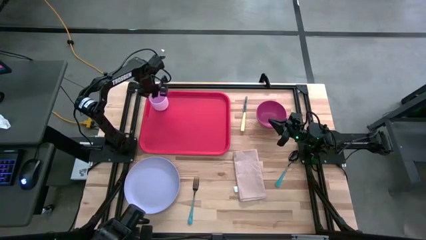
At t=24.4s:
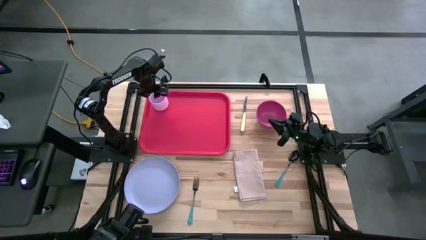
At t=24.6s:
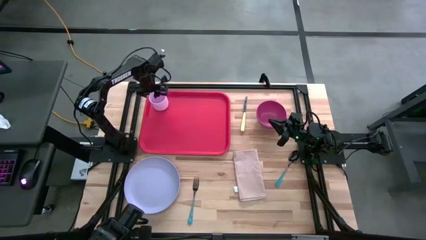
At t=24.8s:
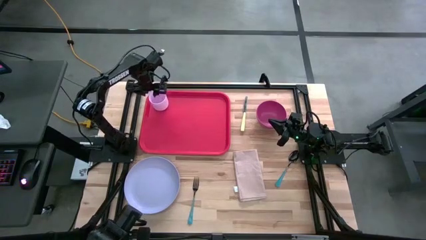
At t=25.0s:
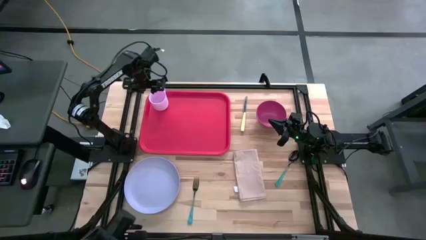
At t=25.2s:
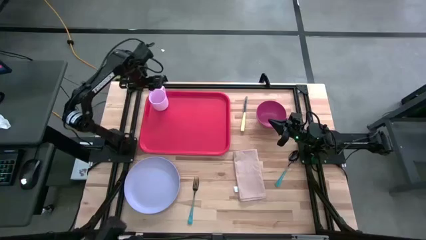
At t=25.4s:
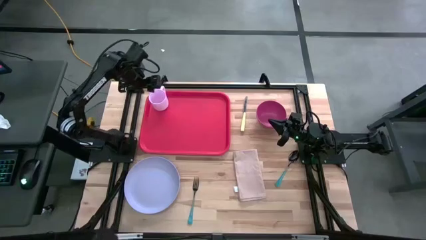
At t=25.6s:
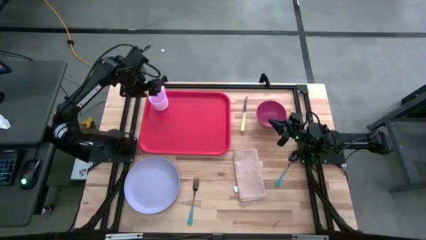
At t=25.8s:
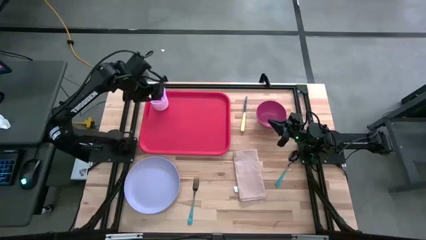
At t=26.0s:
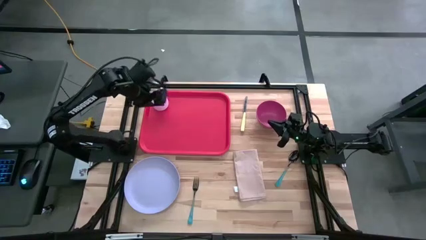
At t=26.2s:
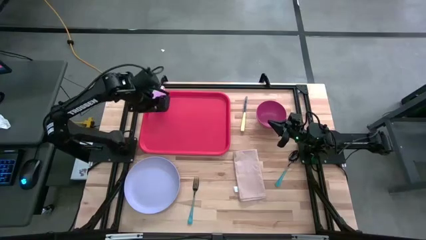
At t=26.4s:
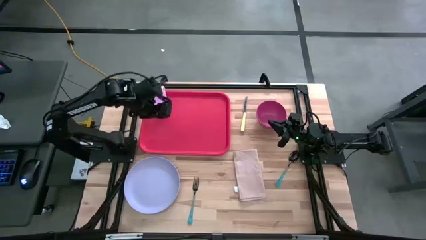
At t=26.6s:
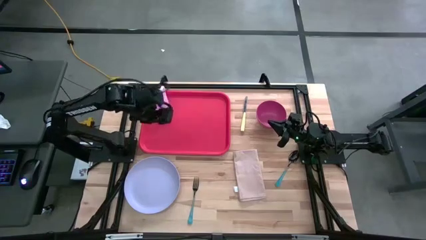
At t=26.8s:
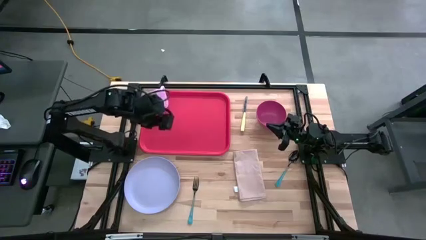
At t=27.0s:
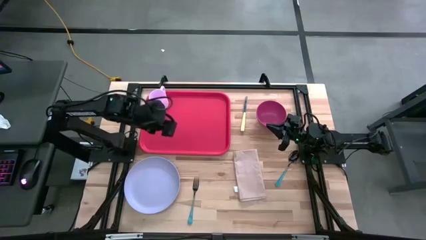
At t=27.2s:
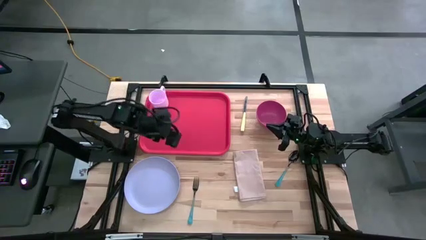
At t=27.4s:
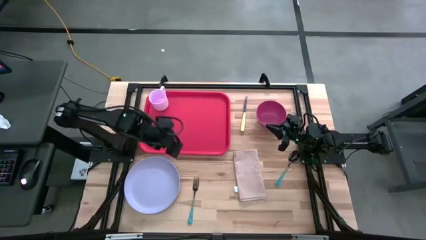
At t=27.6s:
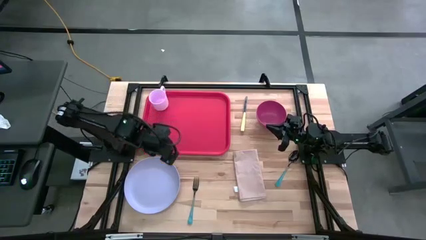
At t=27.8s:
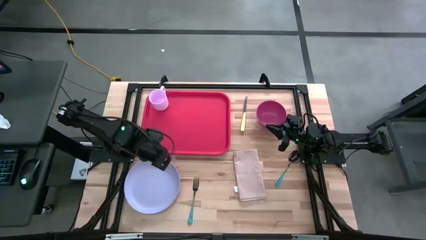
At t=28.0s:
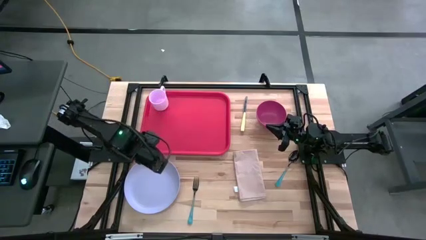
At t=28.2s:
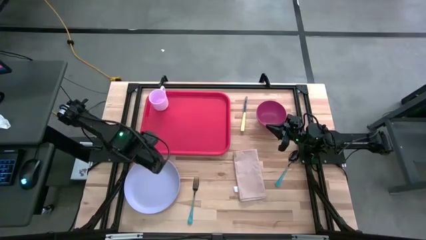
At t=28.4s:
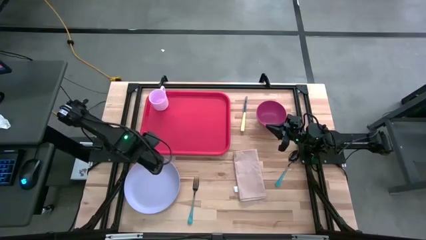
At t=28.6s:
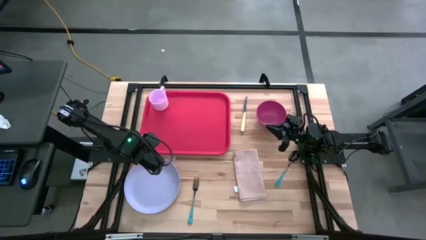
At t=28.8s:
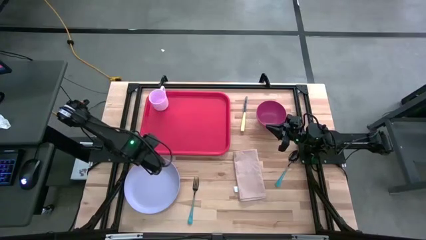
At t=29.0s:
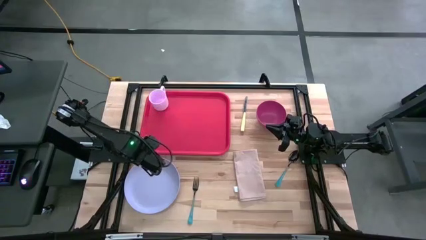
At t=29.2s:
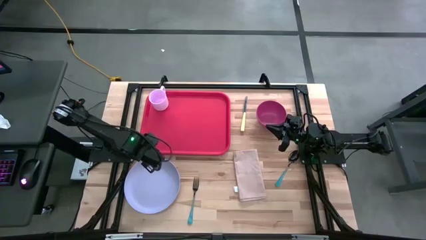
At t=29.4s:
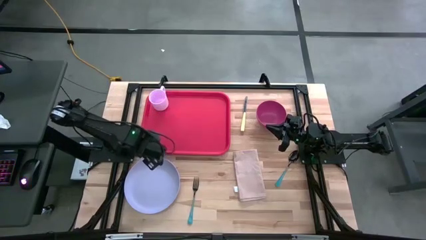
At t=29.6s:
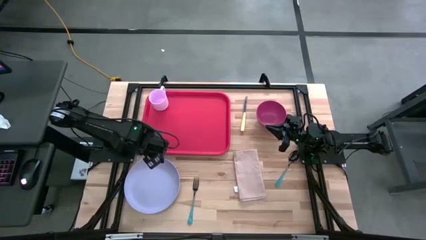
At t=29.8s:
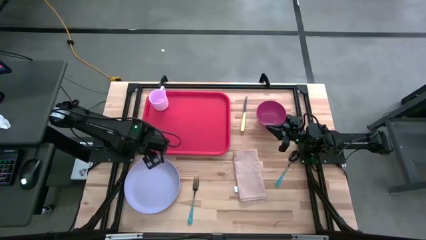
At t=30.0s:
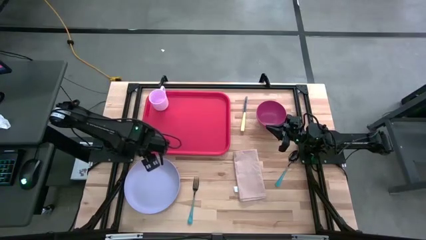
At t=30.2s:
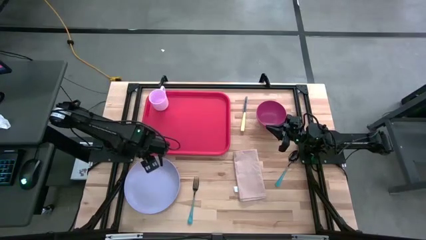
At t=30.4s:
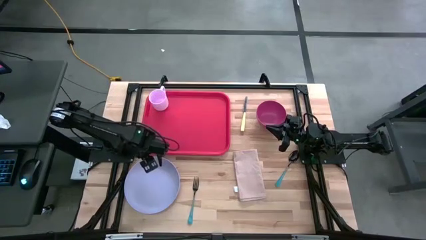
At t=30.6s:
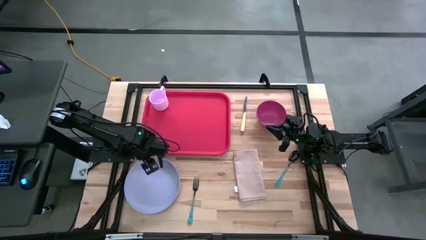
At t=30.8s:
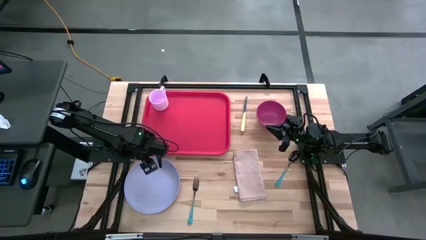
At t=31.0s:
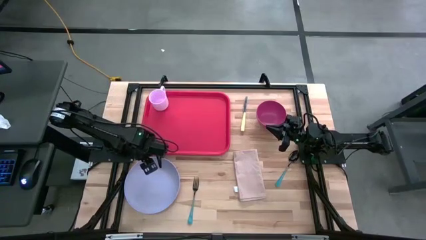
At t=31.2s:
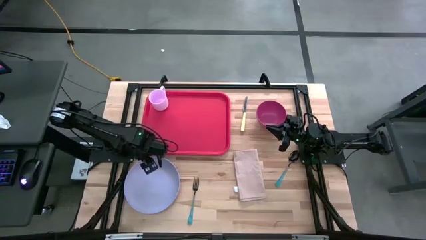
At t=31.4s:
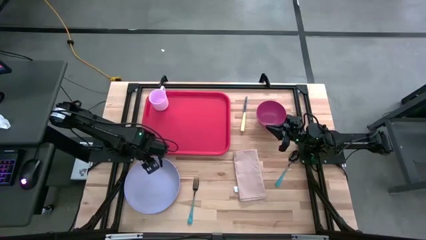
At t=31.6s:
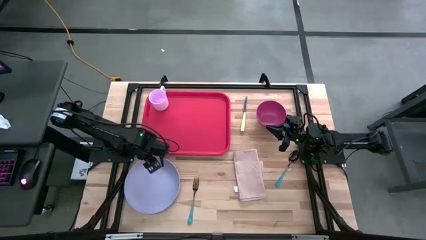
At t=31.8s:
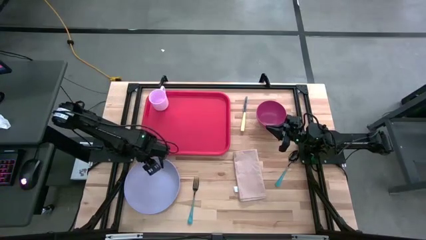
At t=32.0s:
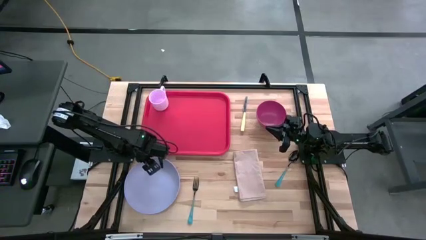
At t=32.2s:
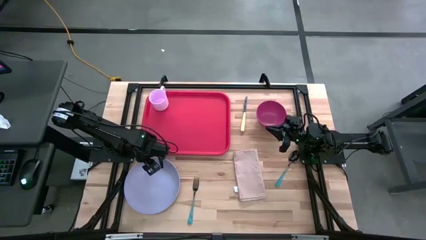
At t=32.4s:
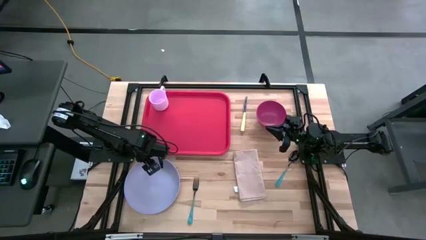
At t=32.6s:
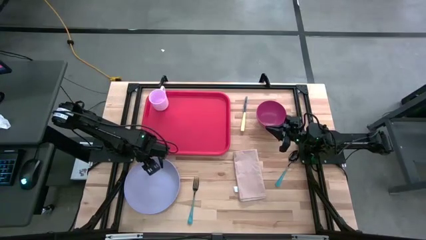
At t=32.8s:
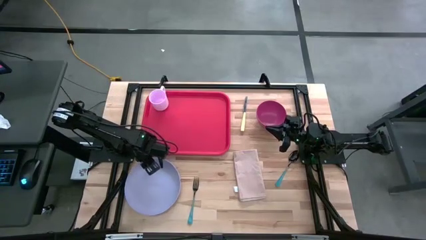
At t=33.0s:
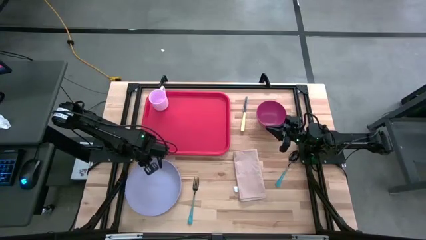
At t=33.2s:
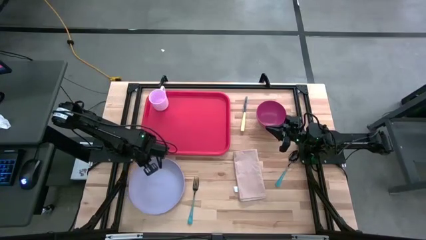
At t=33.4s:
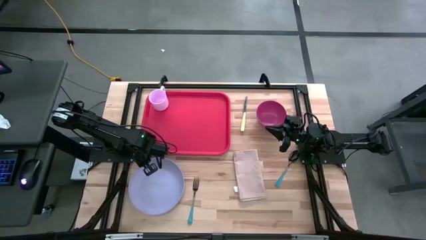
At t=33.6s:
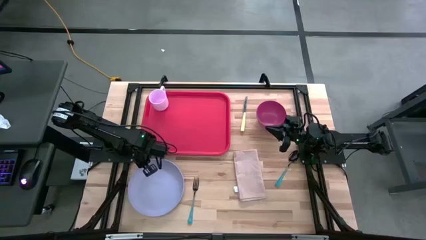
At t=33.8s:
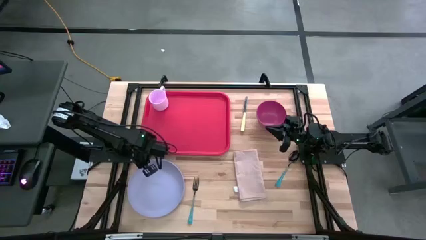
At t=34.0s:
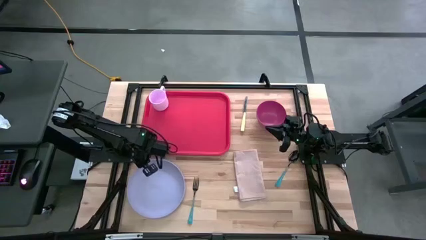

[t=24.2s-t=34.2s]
Task: Set up tray
Put the purple plate on the red tray to the bottom right of the pink mug

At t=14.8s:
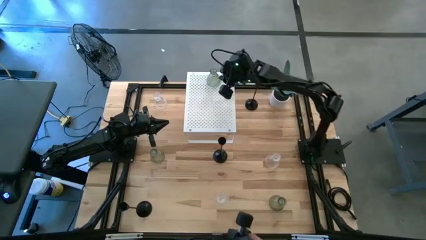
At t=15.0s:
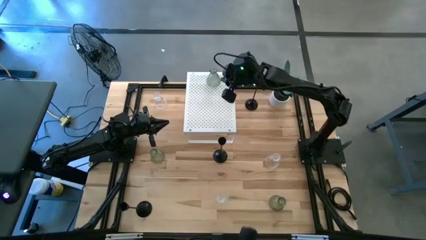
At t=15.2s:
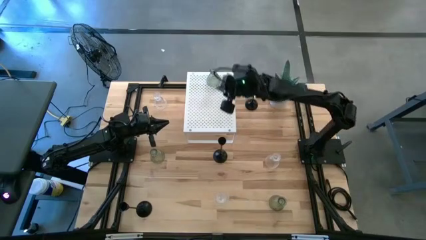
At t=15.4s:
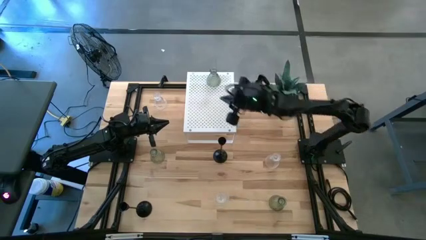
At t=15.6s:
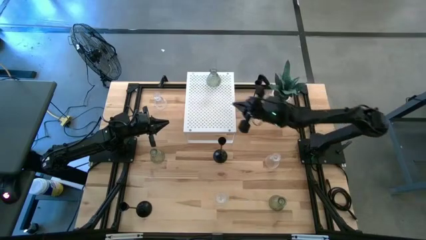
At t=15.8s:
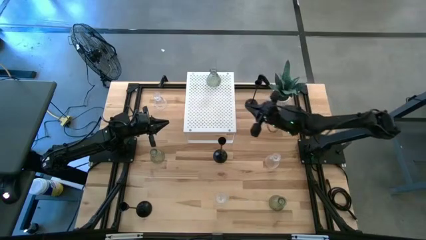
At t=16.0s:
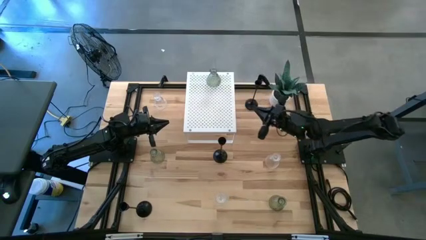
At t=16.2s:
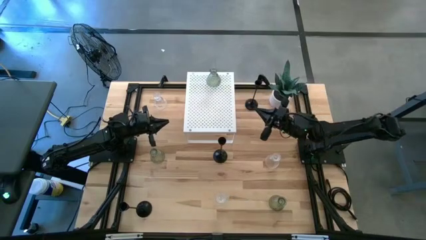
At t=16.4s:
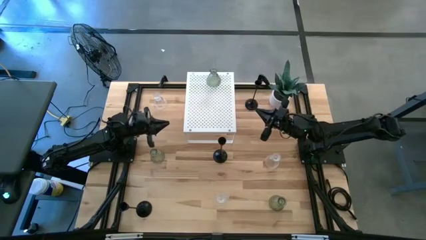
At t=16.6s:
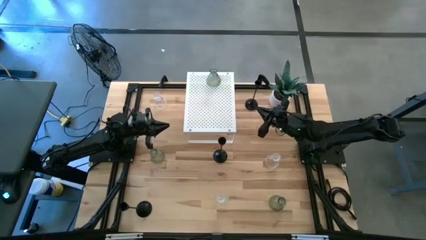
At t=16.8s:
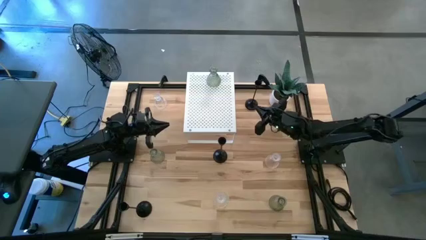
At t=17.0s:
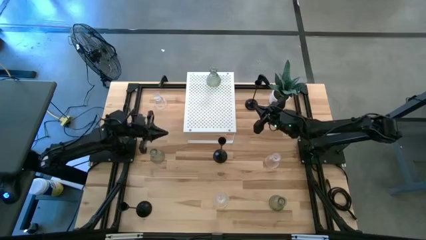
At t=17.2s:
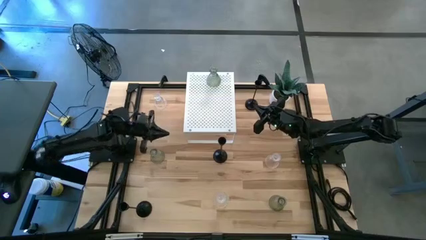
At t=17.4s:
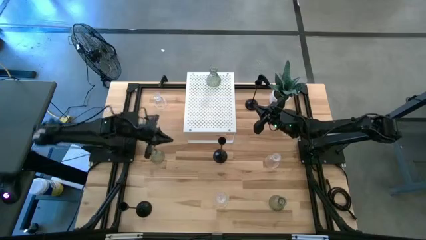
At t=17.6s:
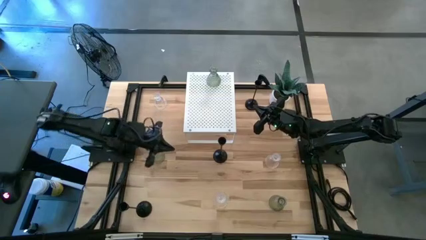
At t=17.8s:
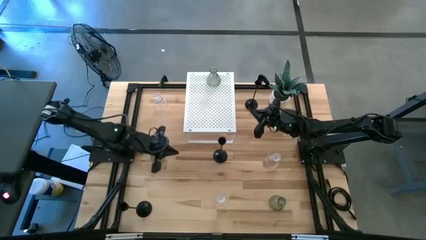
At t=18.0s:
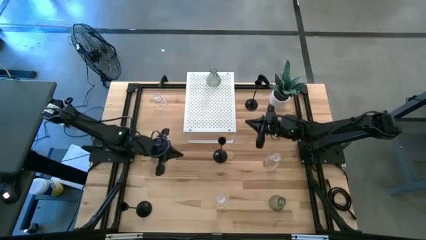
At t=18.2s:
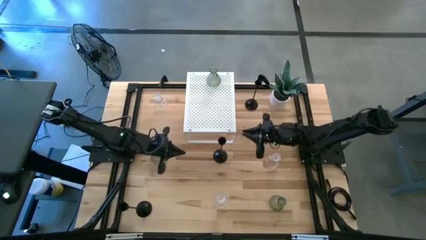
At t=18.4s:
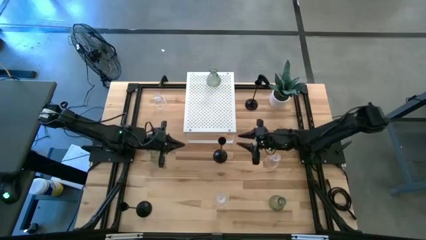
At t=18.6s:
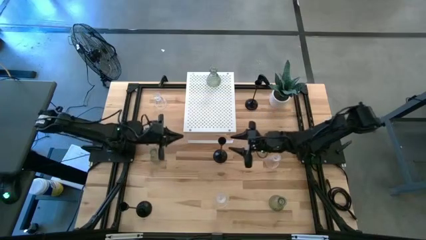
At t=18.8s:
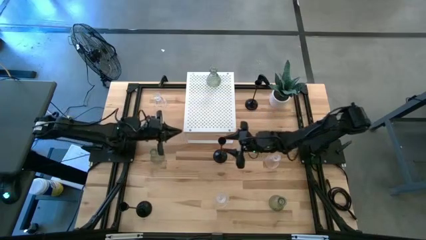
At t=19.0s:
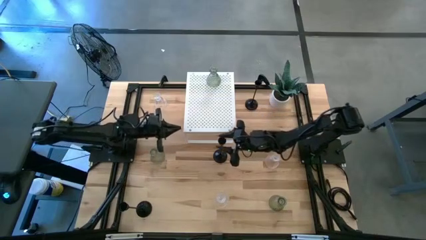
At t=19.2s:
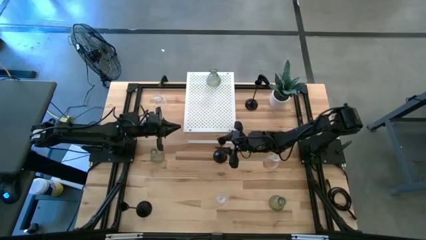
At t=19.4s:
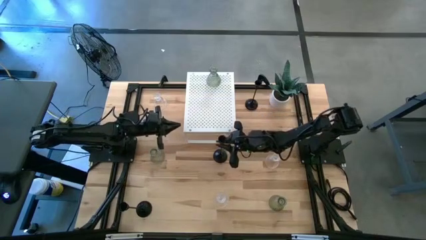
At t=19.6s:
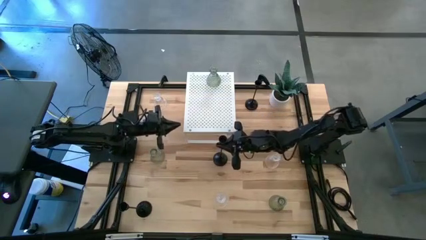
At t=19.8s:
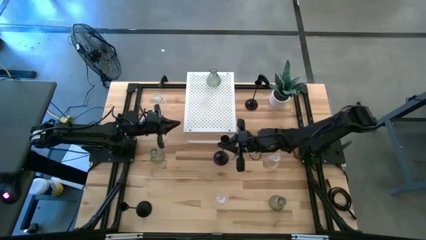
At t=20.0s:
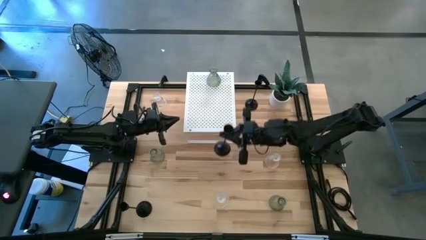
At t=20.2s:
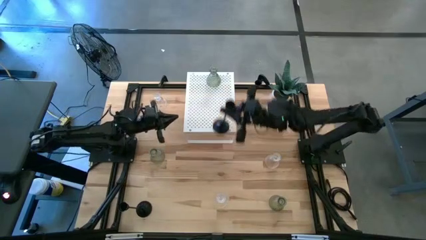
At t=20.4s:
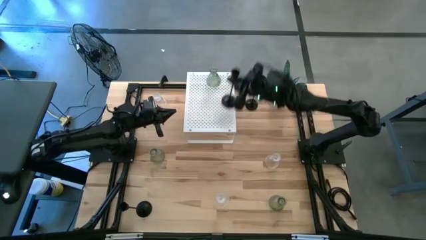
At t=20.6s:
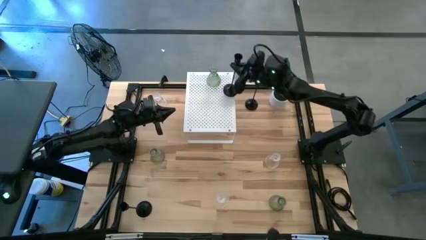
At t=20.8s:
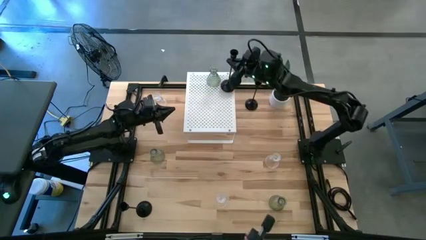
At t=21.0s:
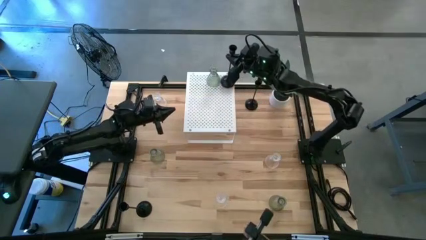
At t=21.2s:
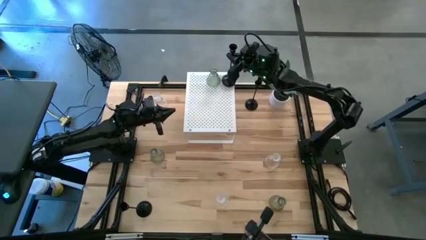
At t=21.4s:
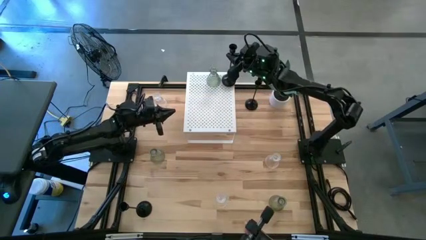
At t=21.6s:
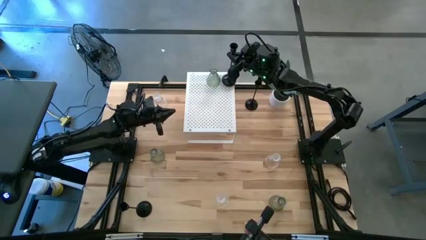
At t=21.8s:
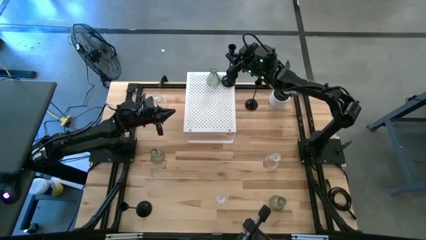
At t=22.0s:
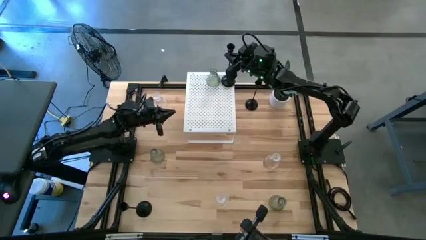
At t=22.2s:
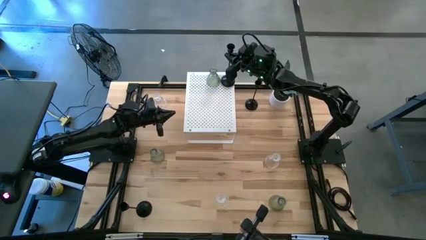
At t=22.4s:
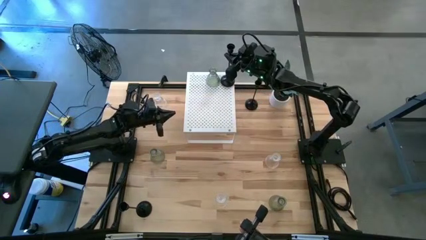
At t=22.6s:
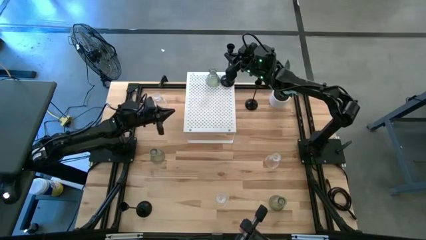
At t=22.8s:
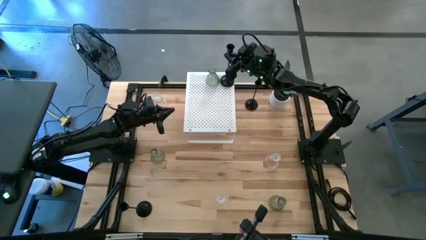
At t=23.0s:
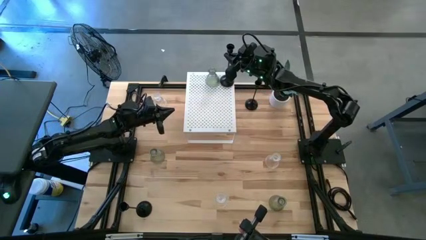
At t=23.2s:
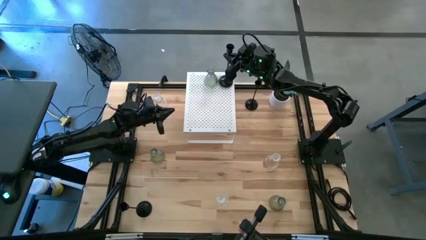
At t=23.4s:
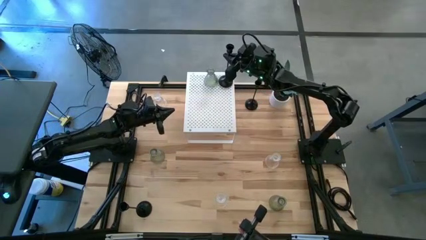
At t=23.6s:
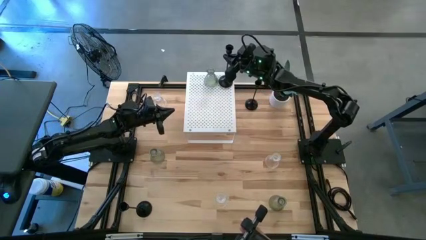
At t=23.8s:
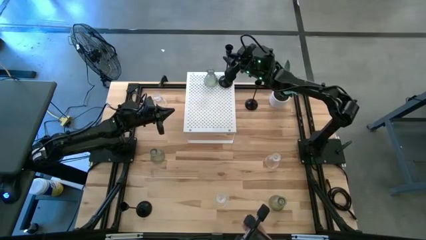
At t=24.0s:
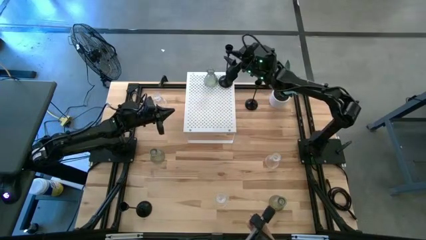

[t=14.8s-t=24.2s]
Task: Pick & Place candle stick holders
Put the middle black candle holder on the shelf
